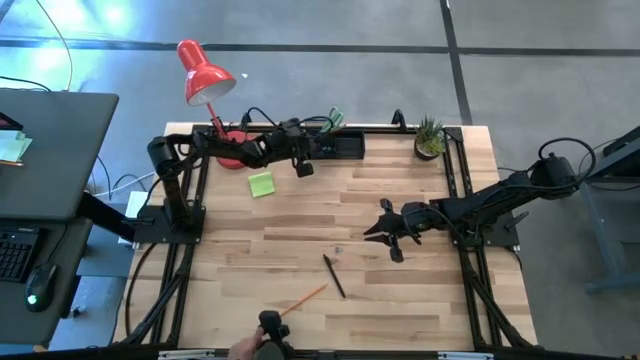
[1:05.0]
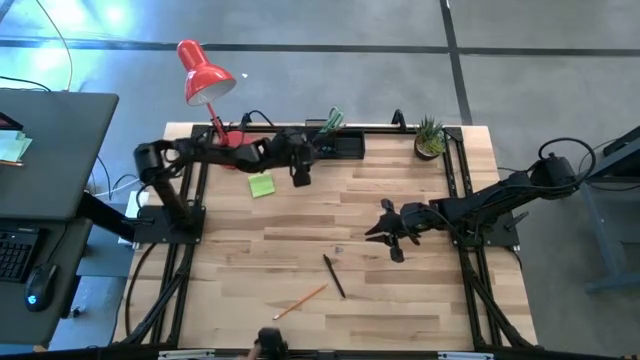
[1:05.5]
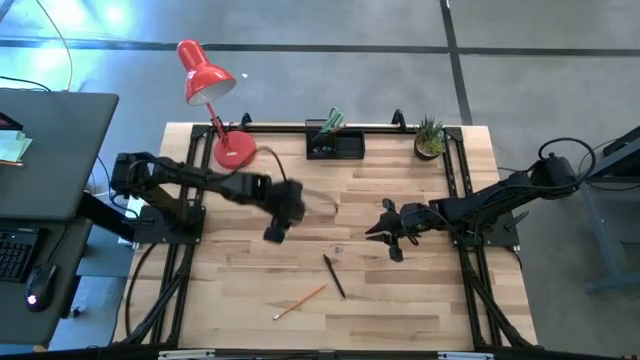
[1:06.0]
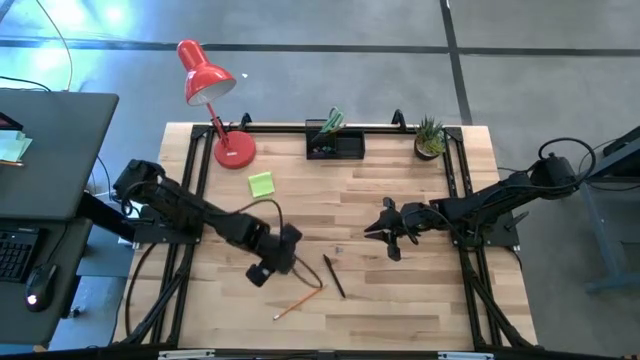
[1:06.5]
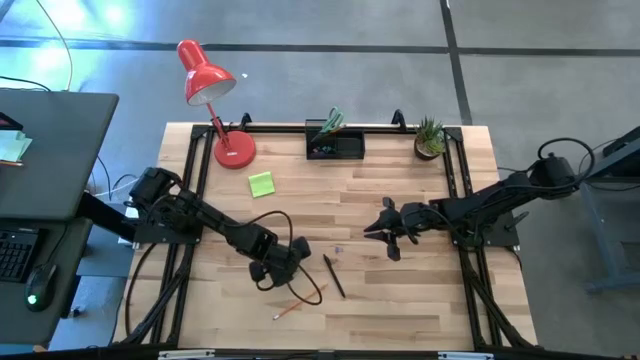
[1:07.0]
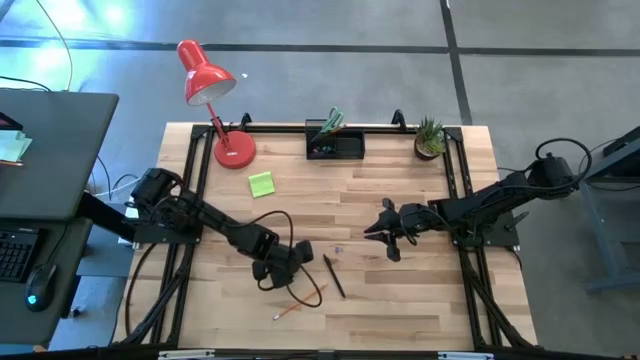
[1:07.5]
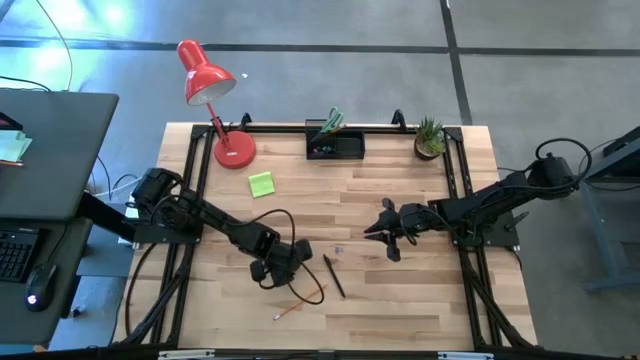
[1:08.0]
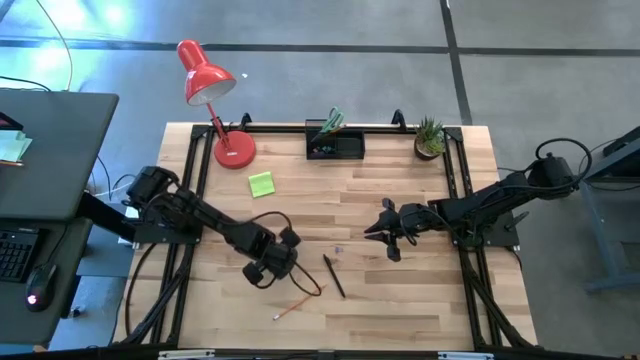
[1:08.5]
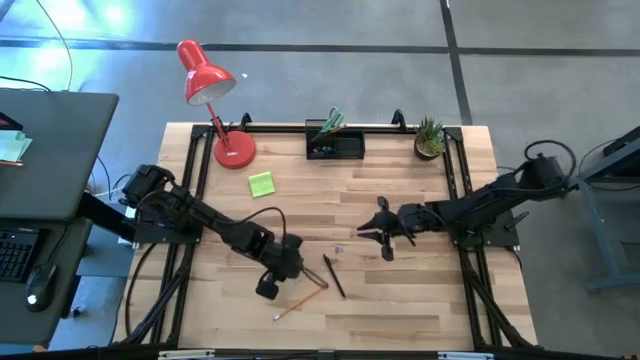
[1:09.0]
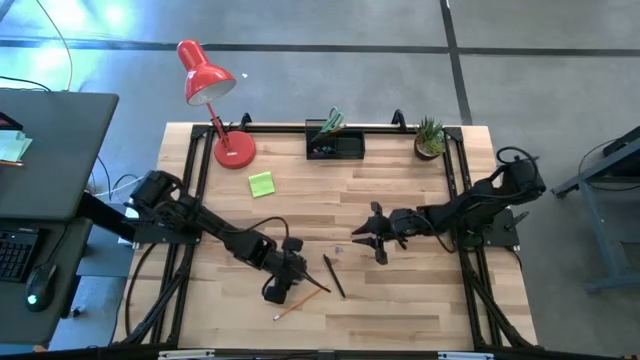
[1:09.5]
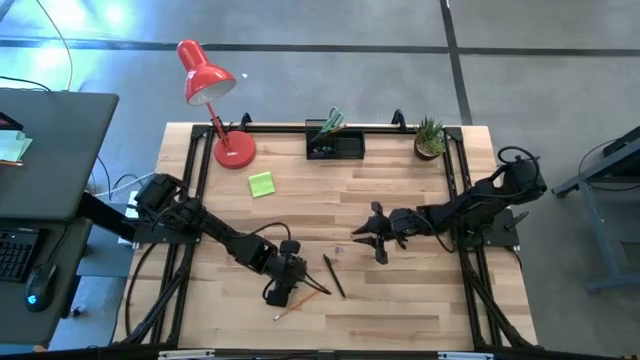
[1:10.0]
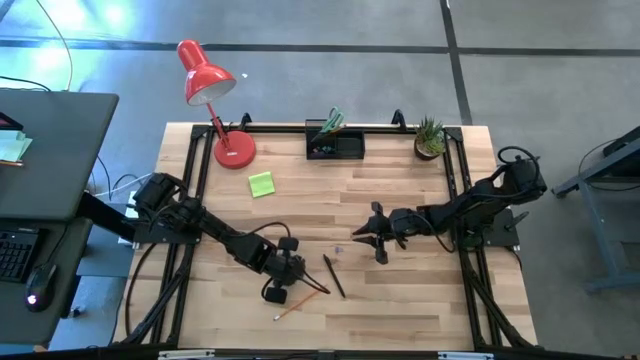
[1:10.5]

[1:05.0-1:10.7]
Task: Pick and place office supplies into organizer
Put the green binder clip into the desk organizer

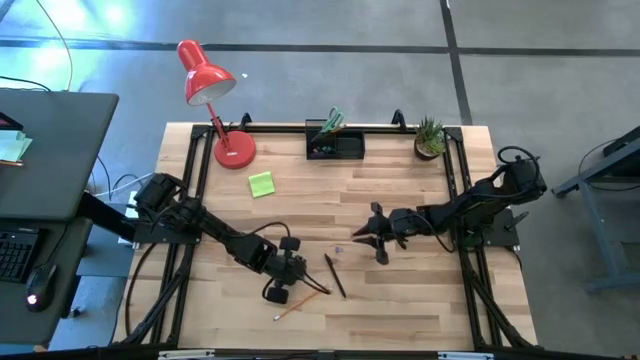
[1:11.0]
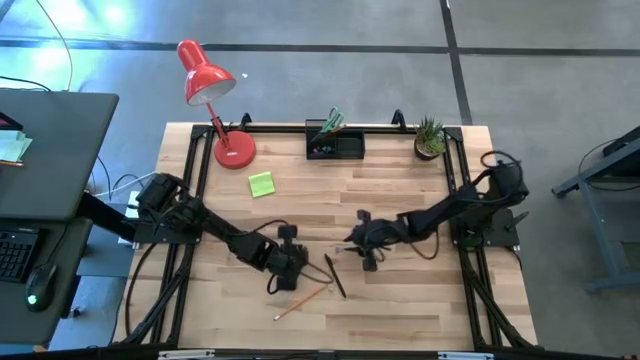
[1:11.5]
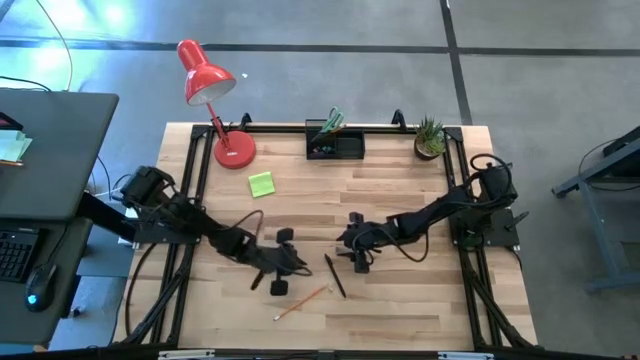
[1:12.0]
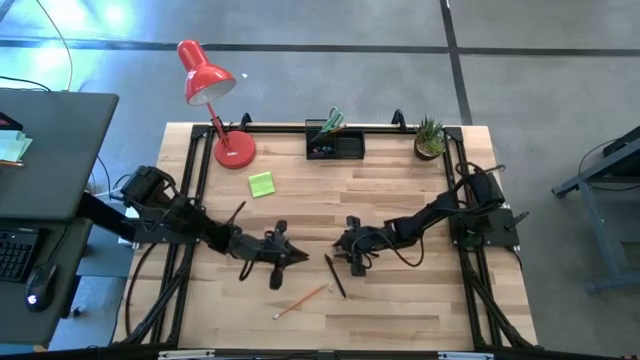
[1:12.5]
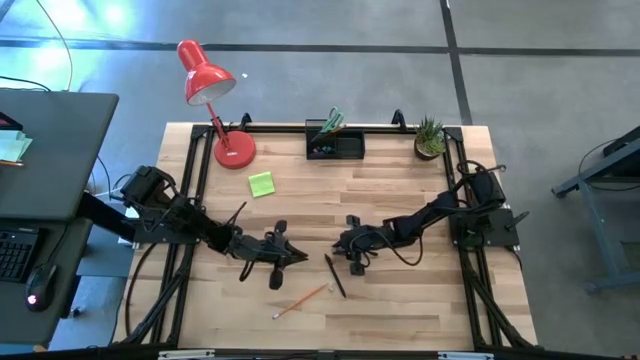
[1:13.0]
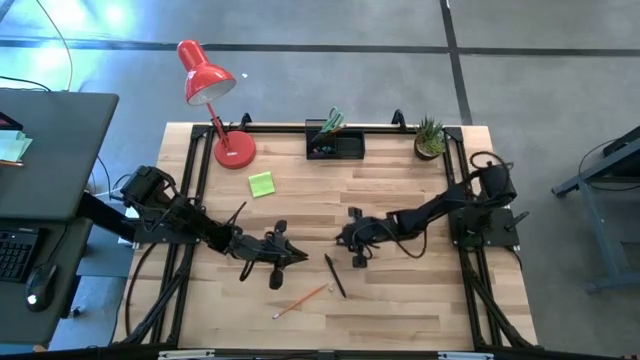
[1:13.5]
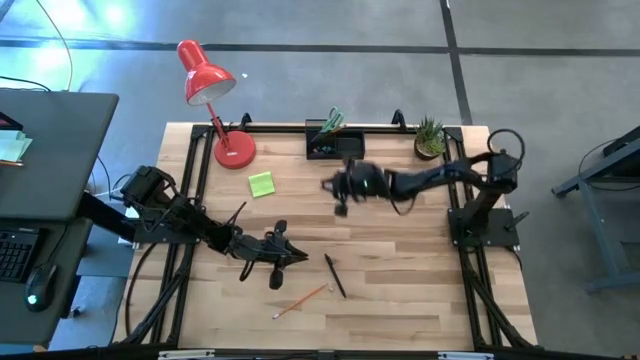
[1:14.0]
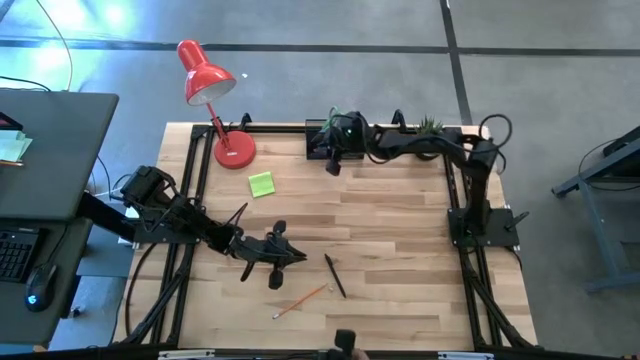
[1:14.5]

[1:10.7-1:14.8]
Put the blue binder clip into the desk organizer

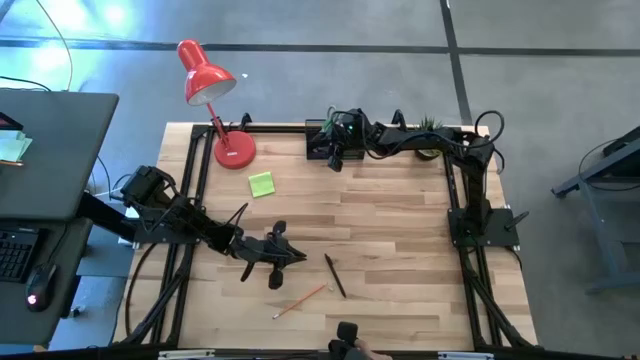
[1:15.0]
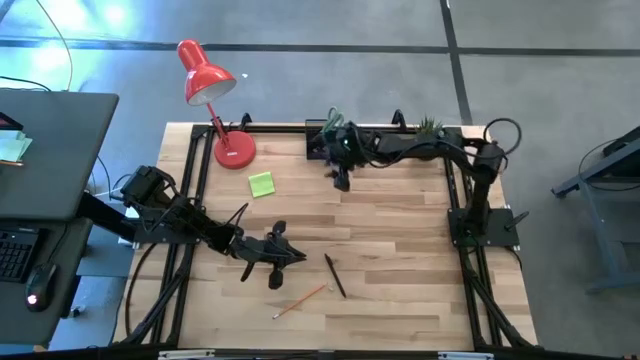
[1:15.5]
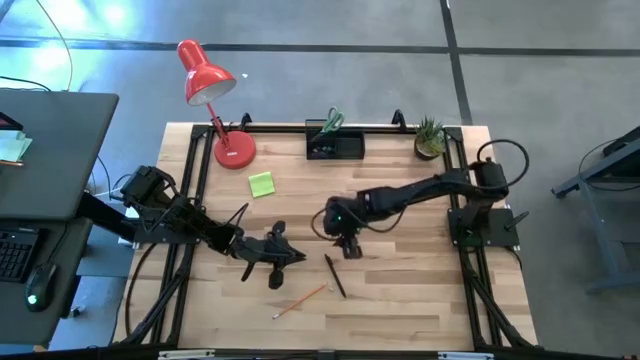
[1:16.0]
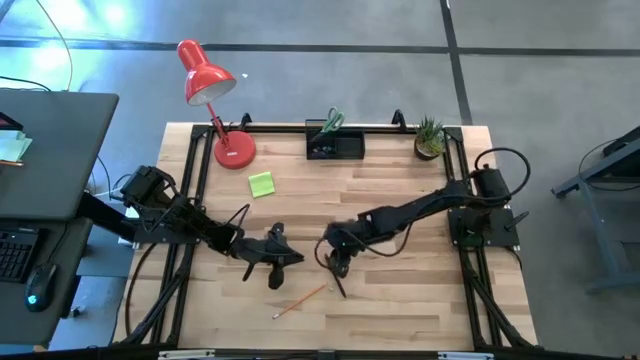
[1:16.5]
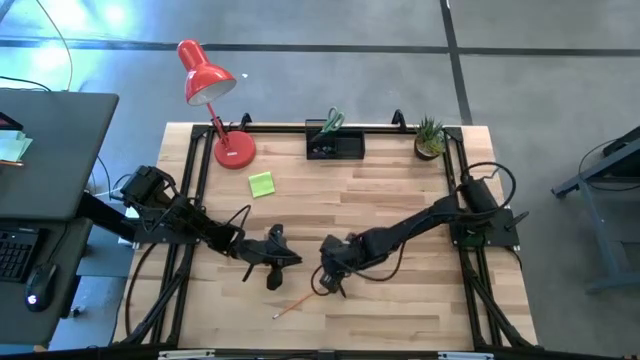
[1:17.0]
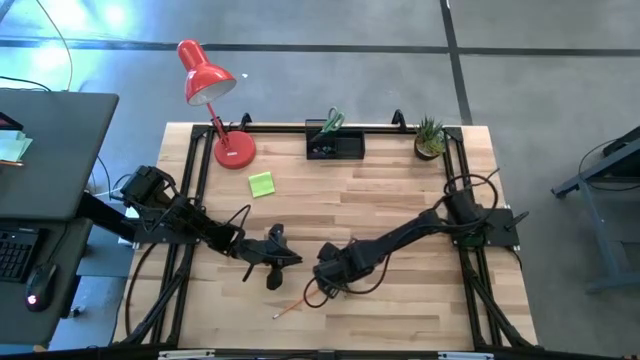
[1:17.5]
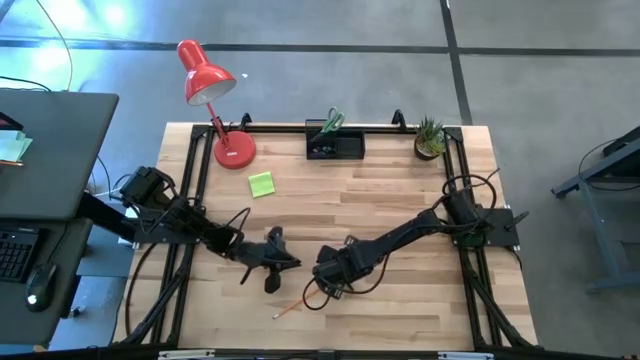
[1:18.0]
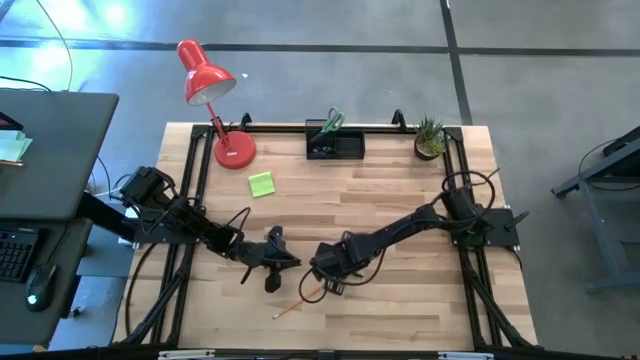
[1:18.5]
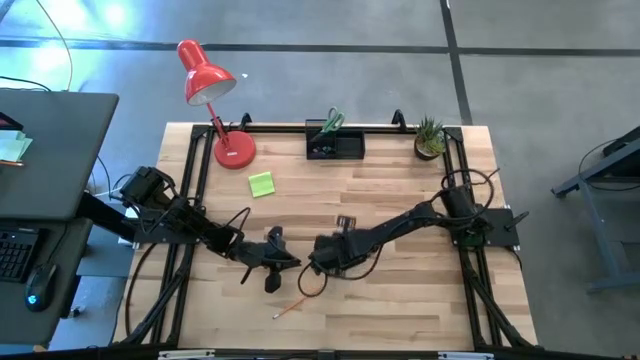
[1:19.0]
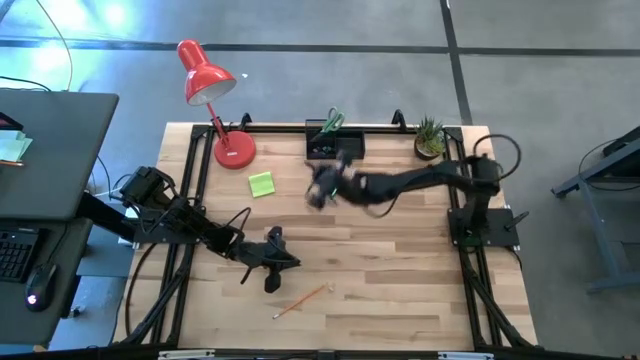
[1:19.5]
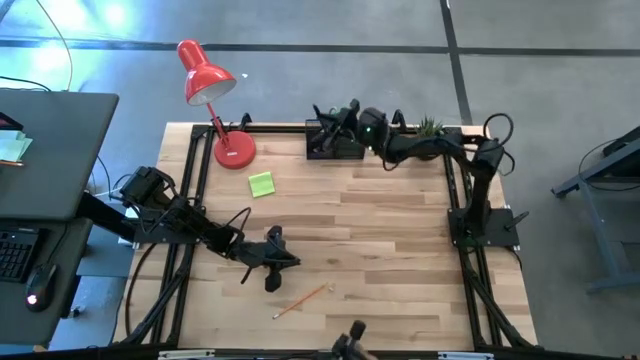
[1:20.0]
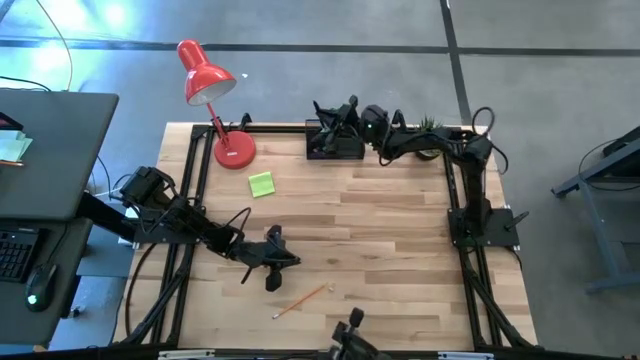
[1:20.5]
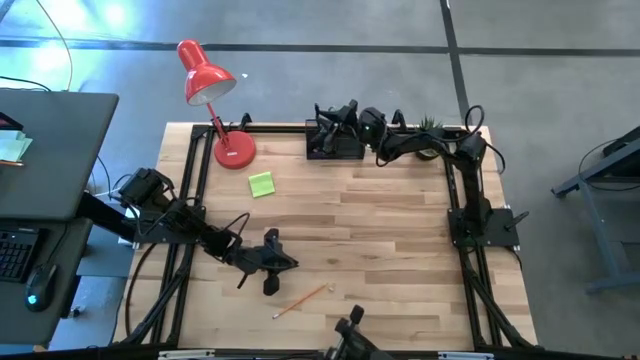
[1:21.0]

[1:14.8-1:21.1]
Put the black pen into the desk organizer

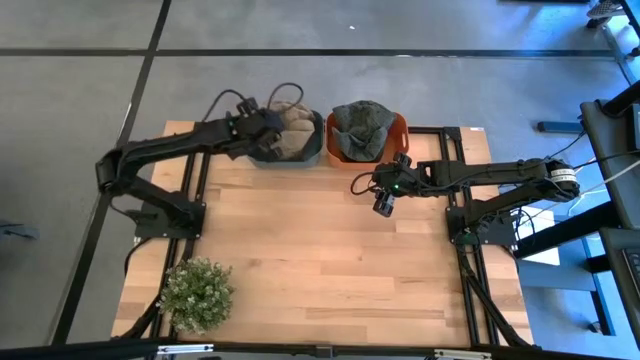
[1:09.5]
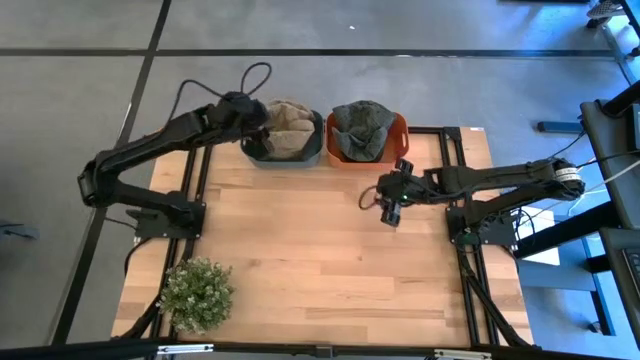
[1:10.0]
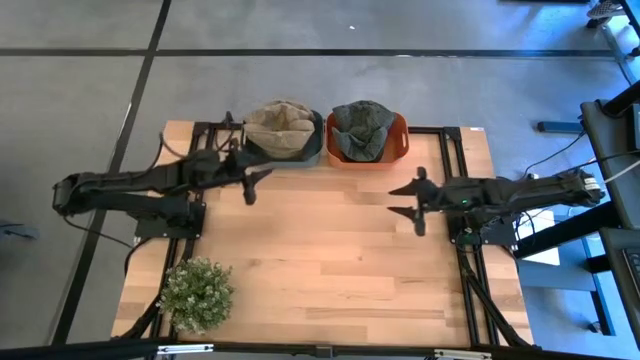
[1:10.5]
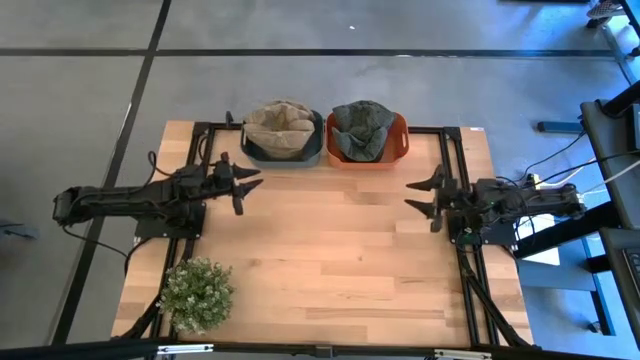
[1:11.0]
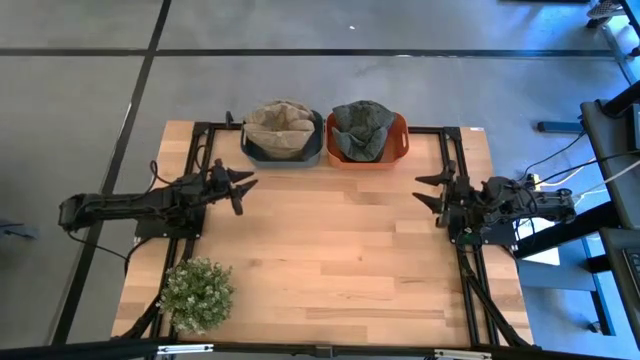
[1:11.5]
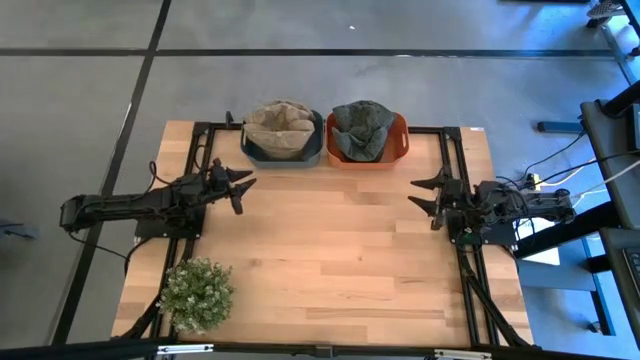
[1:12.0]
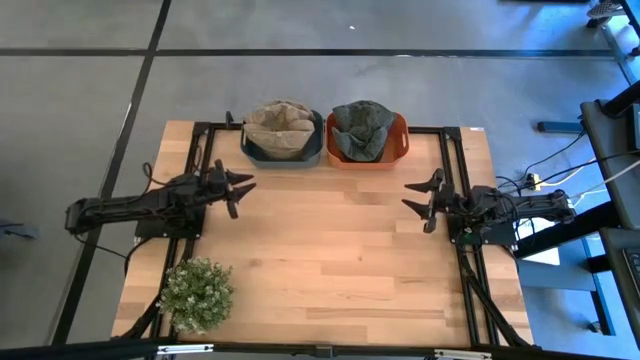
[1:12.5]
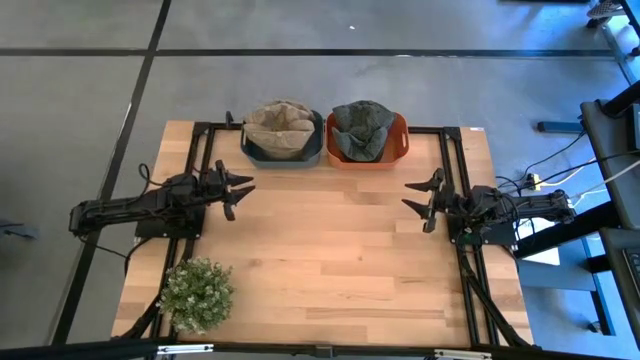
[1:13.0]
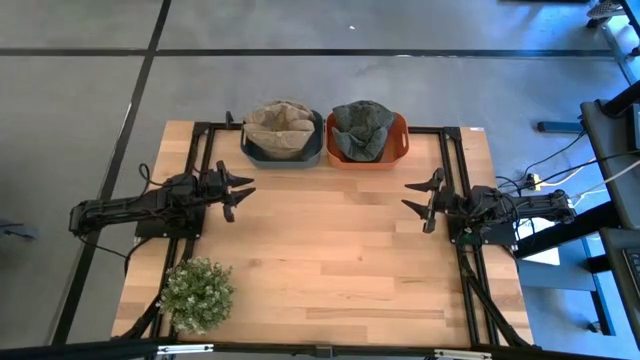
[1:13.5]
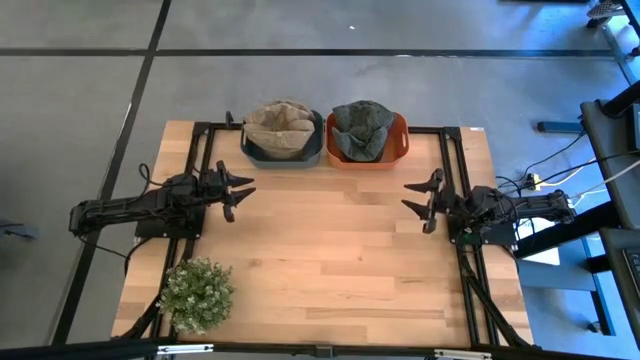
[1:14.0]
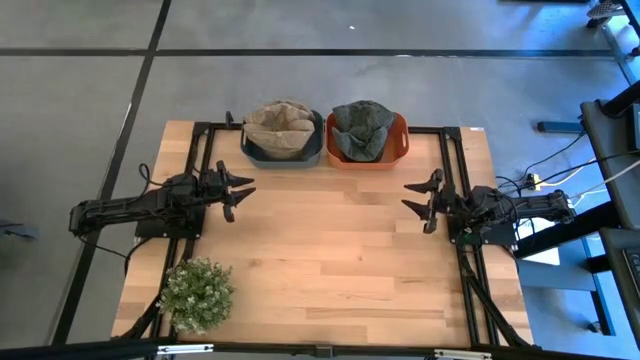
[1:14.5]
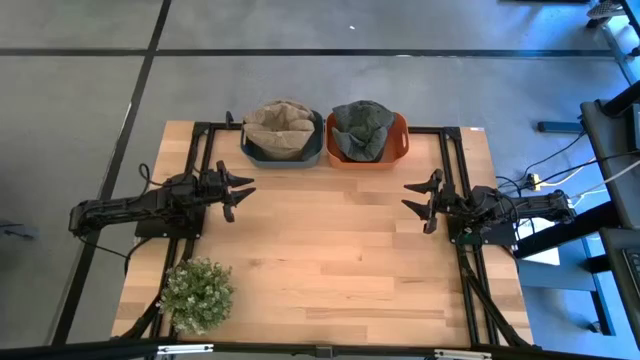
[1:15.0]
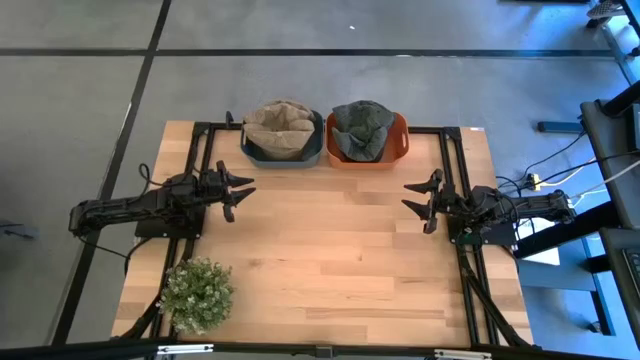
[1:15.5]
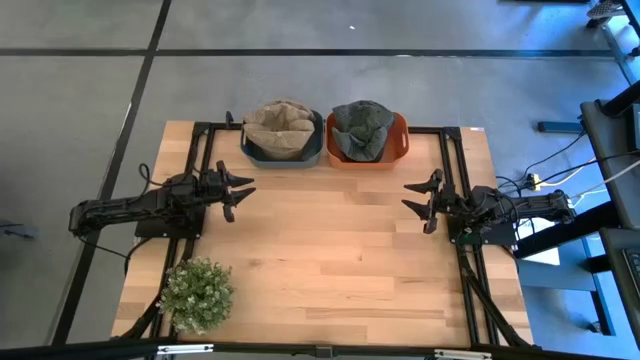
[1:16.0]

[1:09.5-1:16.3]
Task: Pick & Place hat
Return to Home Position
